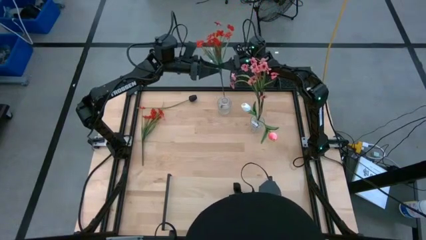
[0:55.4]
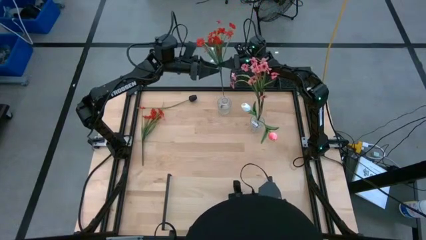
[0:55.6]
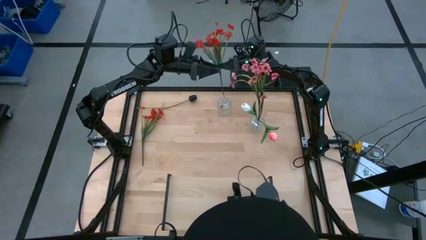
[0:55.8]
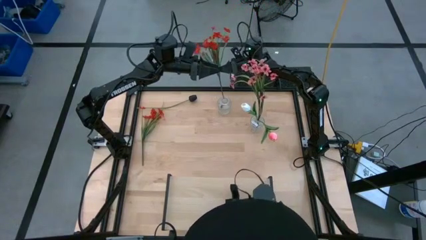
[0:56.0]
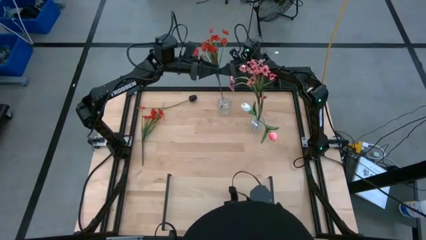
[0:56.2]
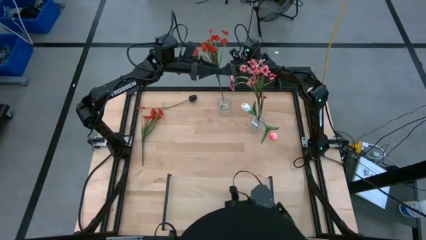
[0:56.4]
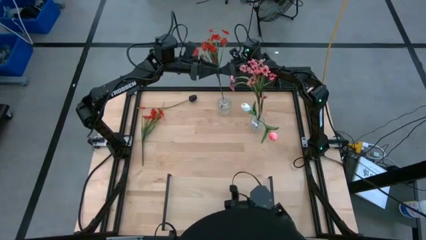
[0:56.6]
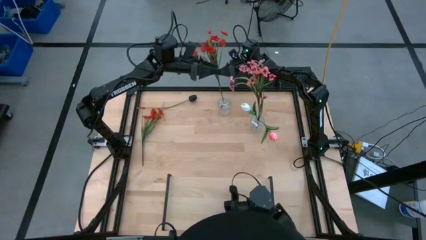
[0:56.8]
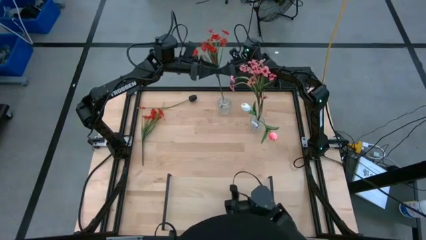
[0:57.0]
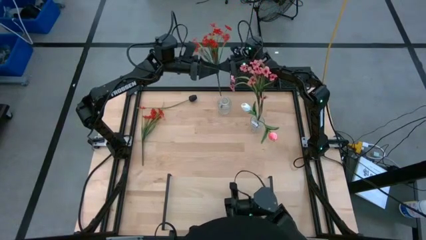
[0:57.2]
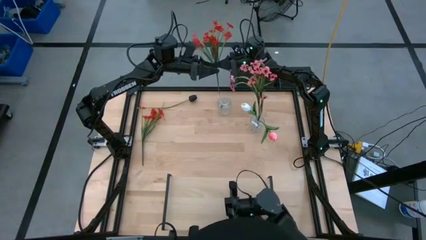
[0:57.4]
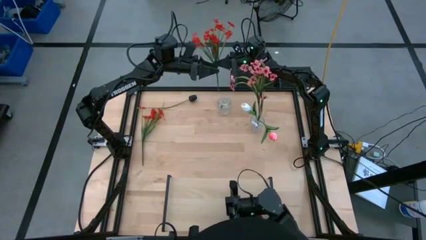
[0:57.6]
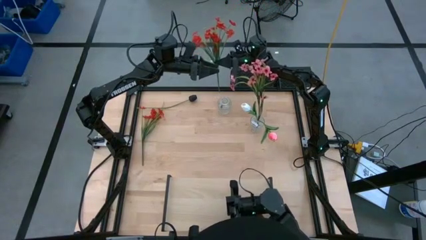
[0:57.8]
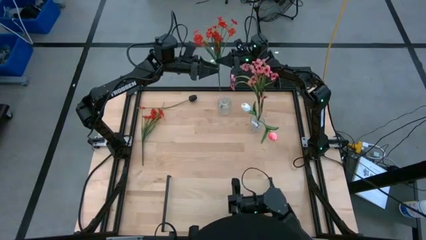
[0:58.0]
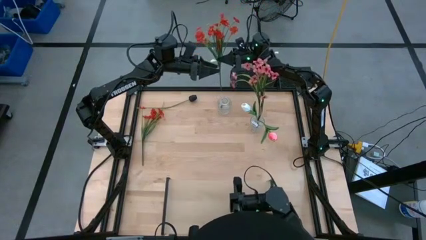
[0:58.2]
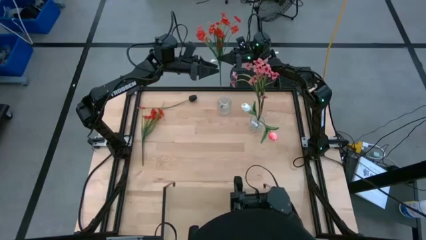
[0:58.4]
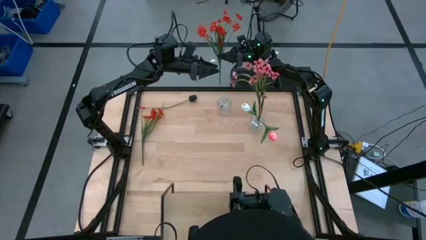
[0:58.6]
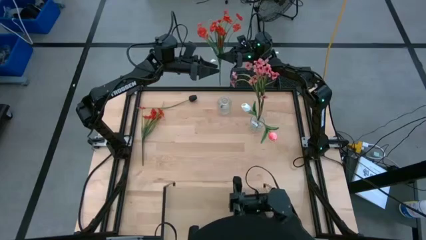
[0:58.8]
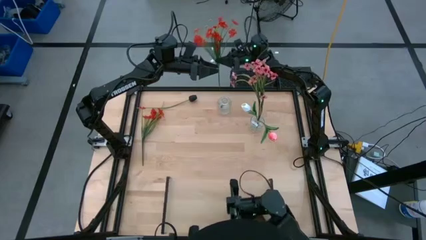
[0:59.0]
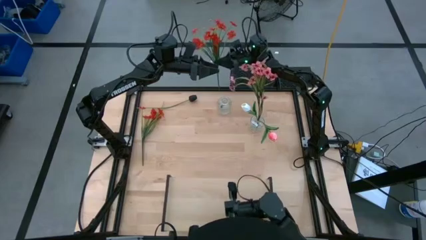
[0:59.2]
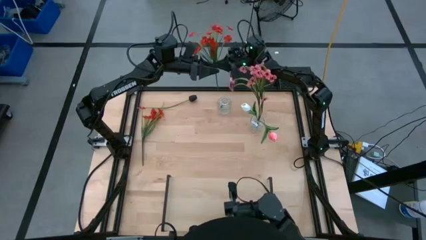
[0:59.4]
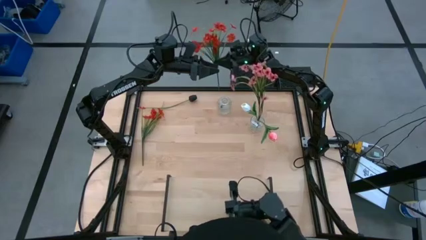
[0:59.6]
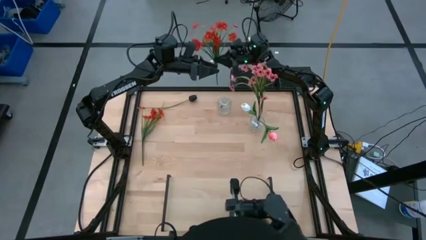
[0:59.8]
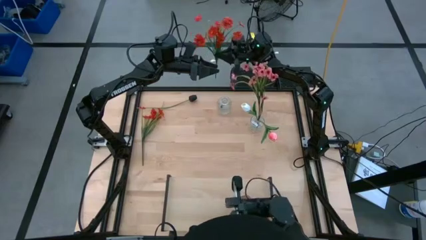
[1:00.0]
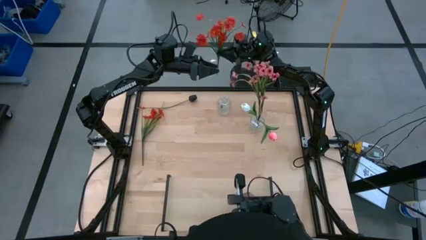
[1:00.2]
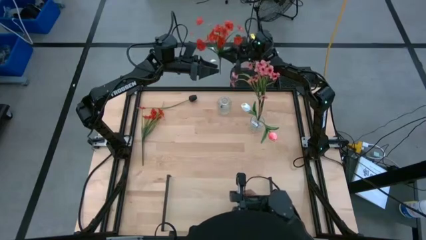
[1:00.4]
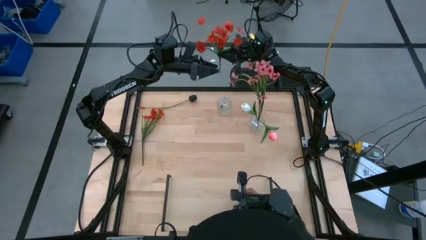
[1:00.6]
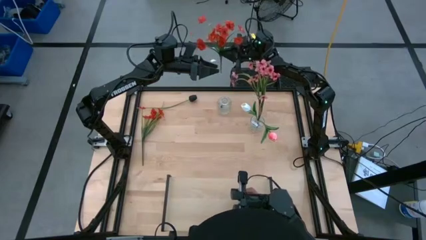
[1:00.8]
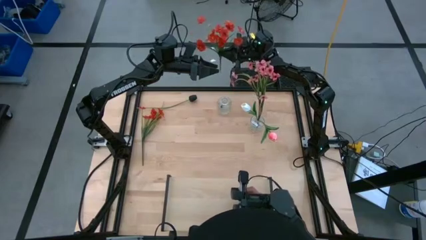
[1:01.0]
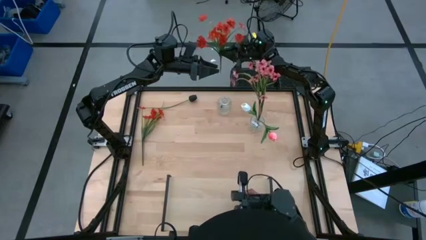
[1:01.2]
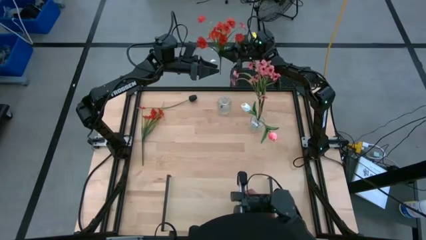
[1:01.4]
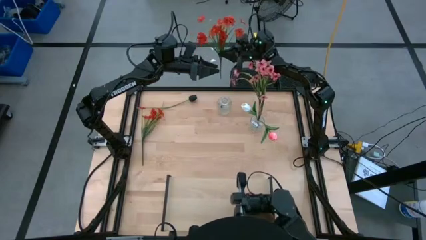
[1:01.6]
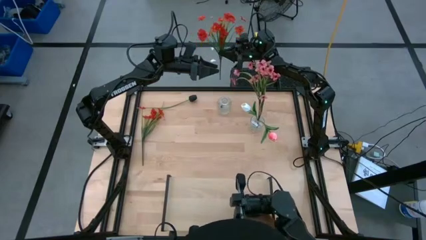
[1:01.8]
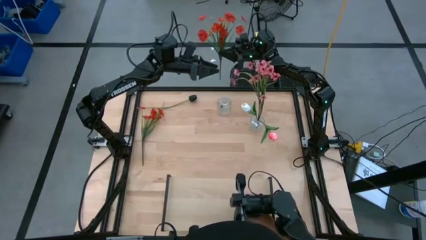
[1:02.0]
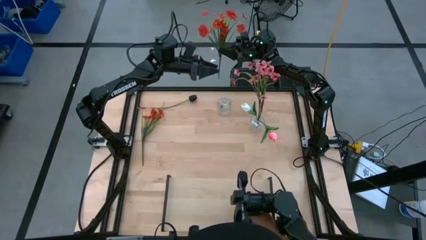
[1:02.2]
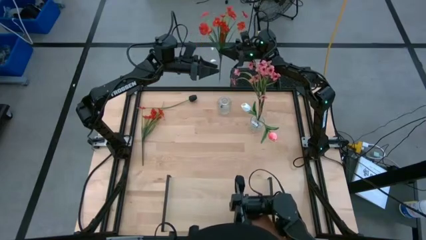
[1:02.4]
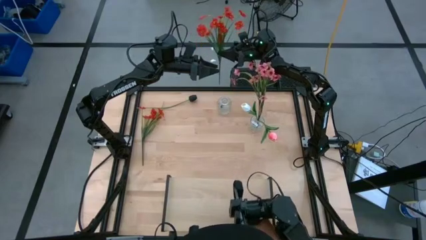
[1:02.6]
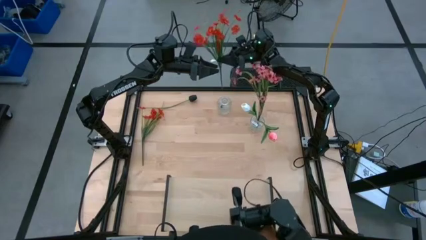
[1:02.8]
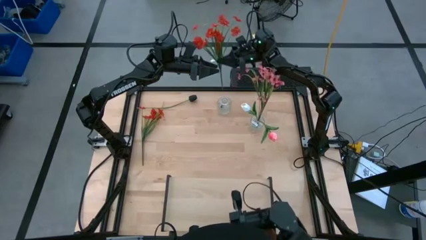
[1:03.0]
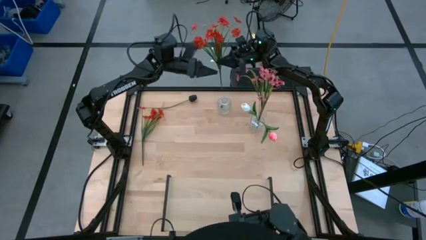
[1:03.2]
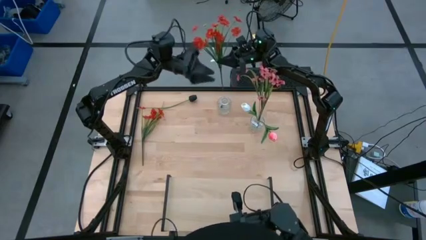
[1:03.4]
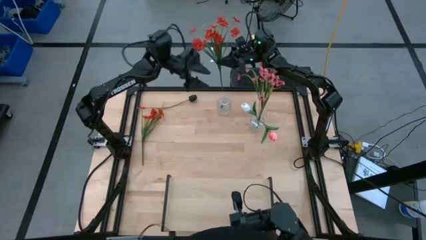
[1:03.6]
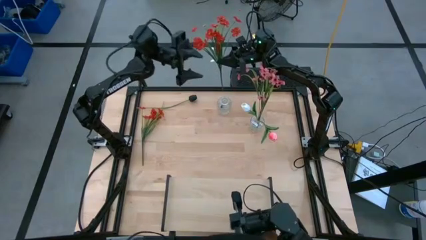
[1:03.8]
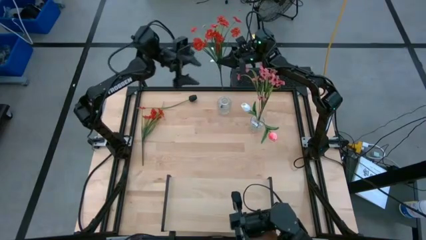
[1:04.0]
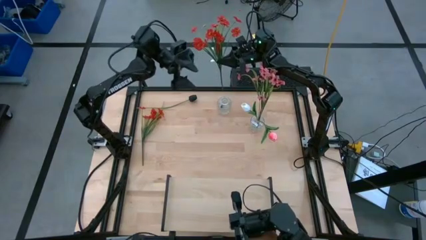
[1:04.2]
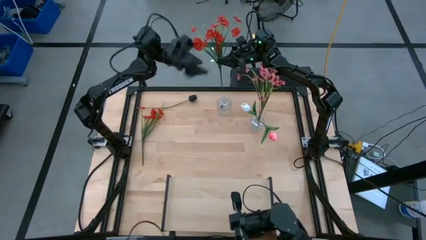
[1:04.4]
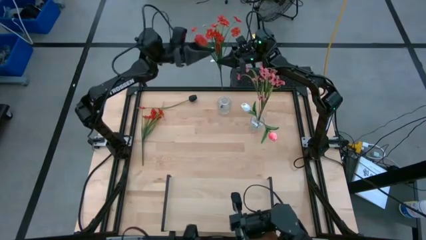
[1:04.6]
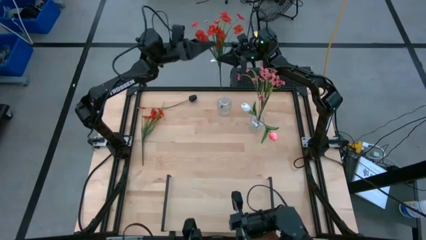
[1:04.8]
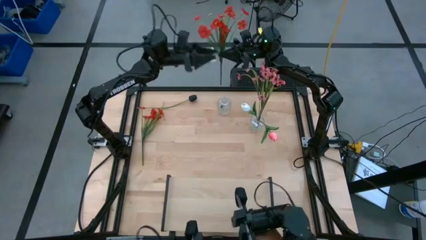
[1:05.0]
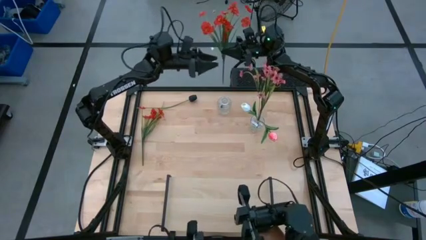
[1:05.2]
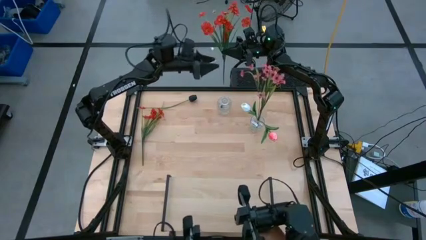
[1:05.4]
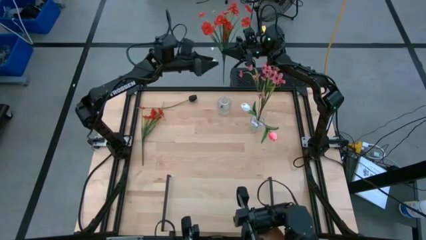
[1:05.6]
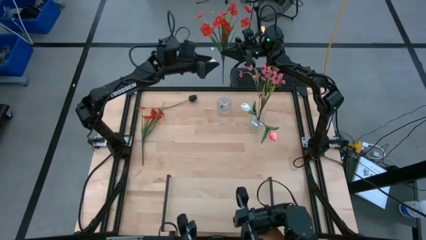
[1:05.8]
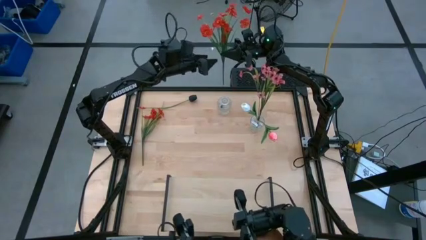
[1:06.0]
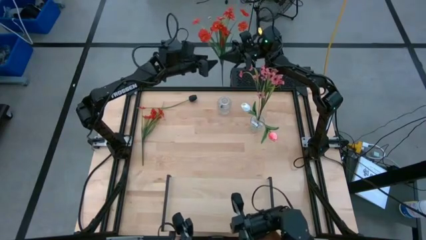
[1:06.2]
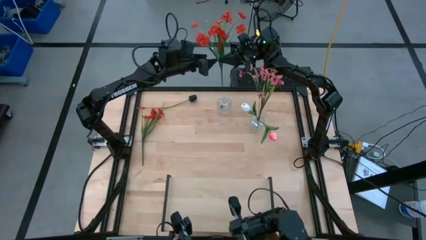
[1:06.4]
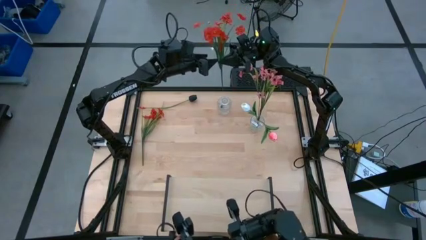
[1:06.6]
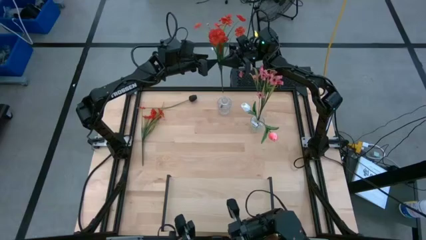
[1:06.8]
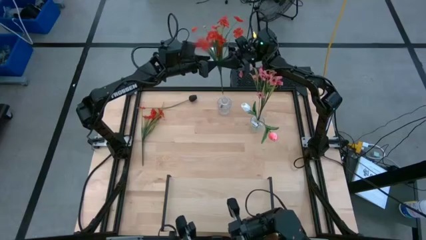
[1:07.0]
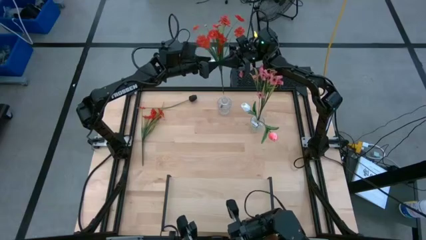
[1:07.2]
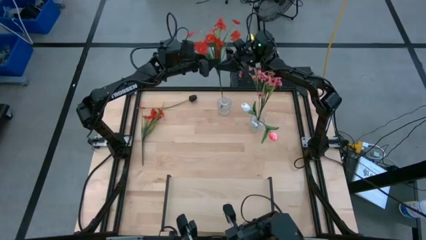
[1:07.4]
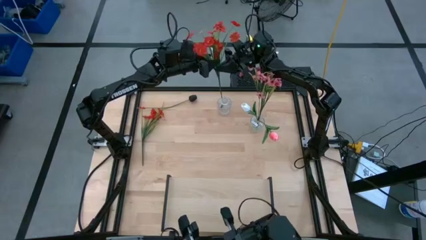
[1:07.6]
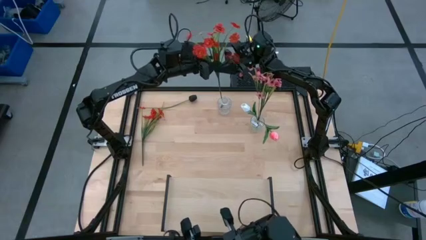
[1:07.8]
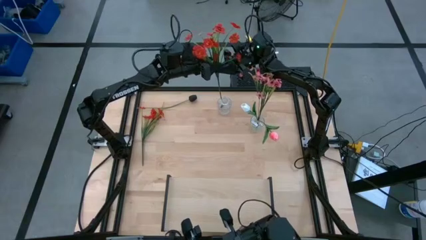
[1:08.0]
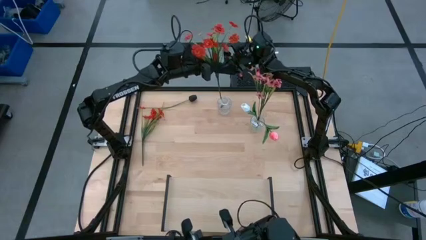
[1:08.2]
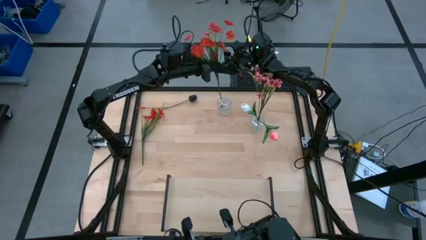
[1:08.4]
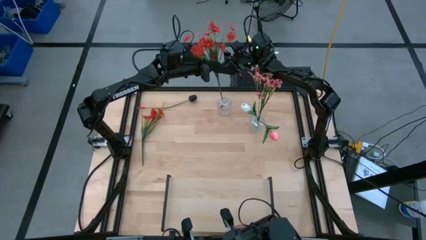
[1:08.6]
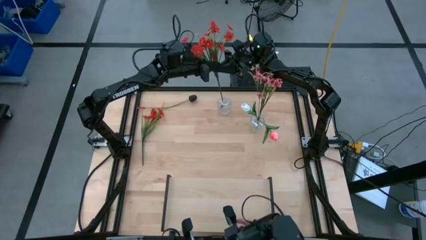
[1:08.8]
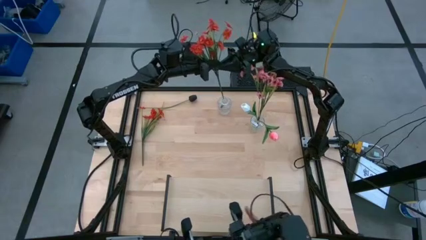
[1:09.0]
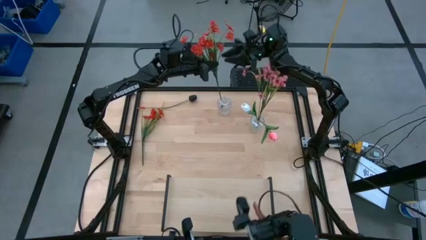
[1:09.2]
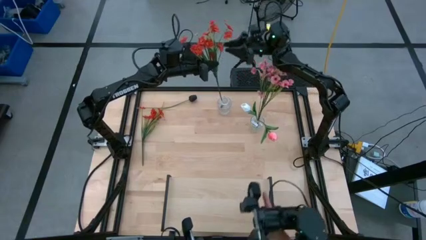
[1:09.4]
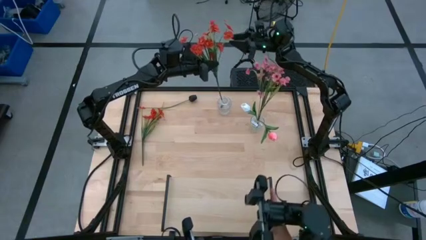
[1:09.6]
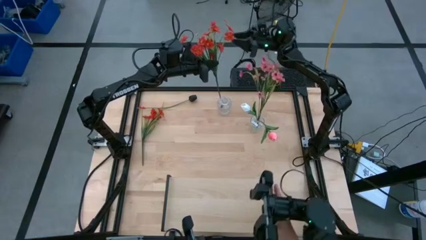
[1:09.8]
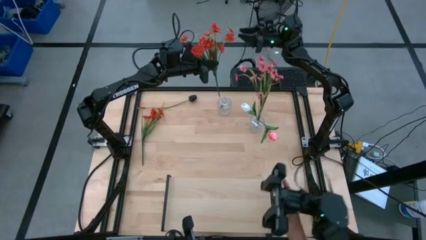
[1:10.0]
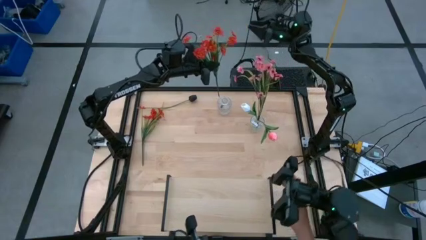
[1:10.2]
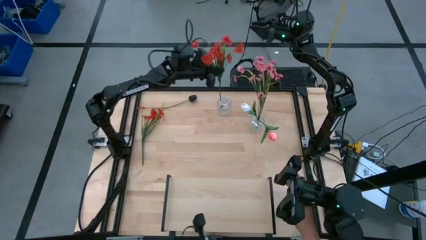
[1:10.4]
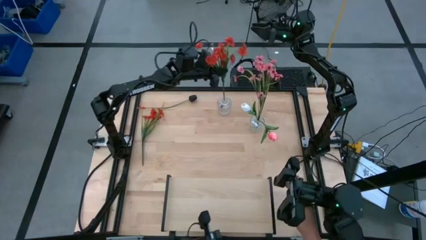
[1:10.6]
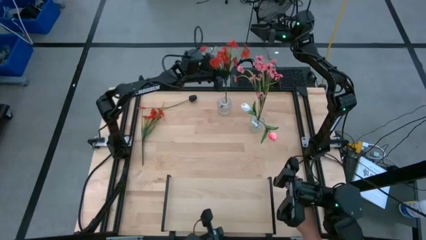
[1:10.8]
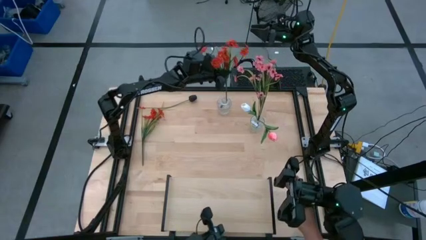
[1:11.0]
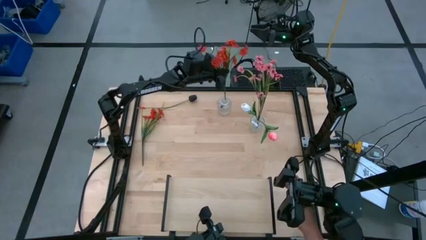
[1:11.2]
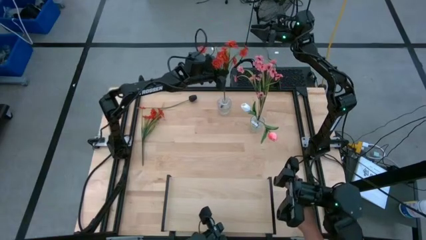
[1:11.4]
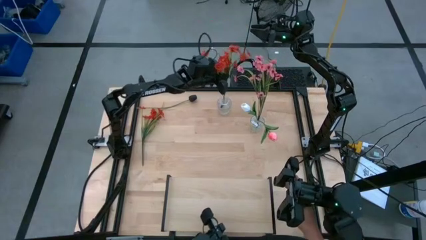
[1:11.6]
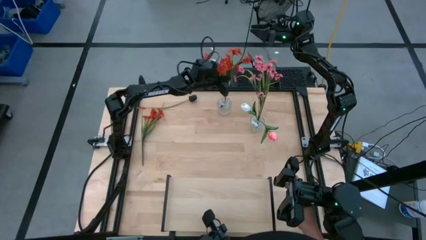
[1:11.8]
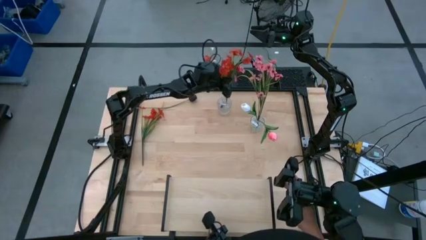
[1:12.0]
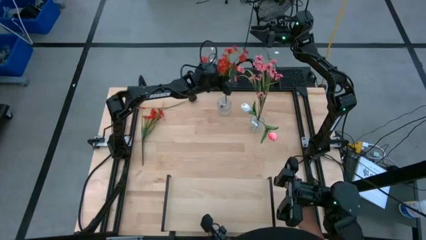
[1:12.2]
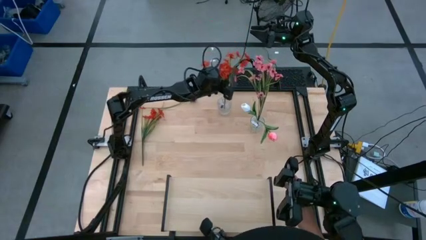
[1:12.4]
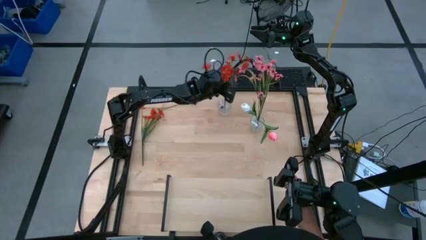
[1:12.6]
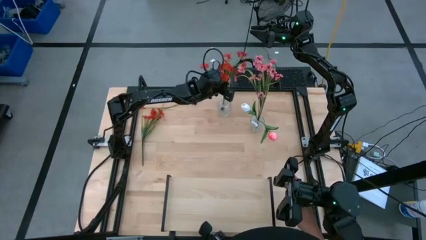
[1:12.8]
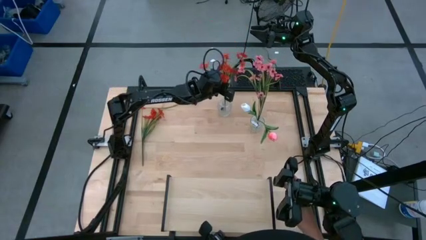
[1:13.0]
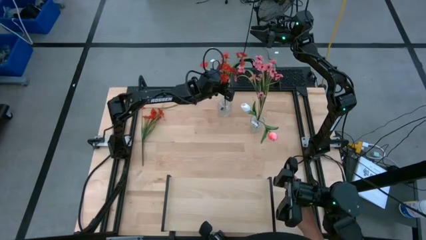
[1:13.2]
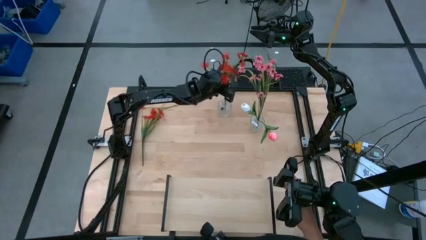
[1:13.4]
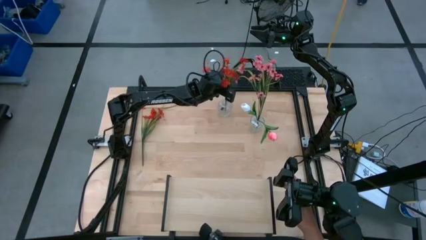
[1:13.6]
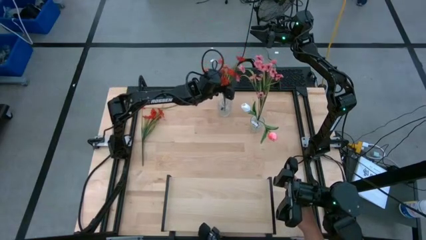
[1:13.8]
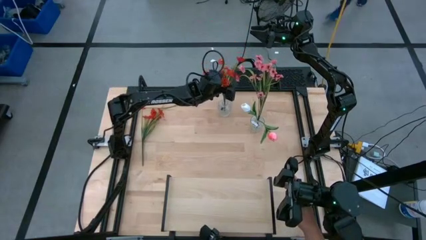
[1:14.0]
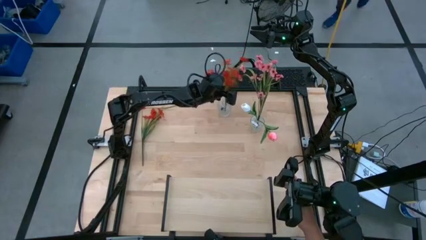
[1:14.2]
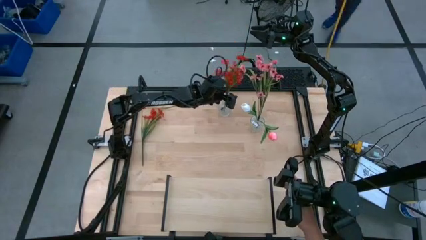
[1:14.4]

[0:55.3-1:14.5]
Task: Pick and place flowers into a vace then onto a shelf
Put the right red flowers into the left transparent vase
